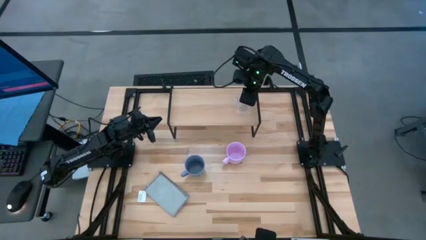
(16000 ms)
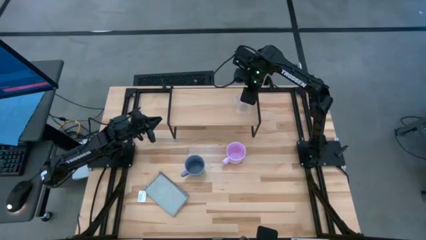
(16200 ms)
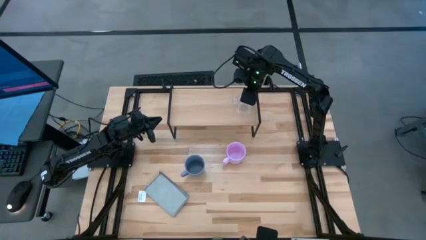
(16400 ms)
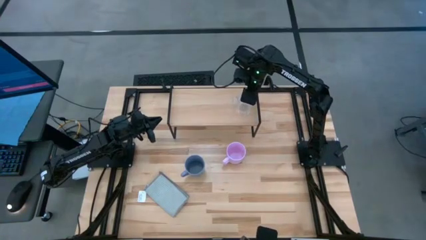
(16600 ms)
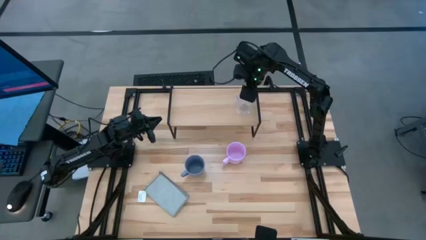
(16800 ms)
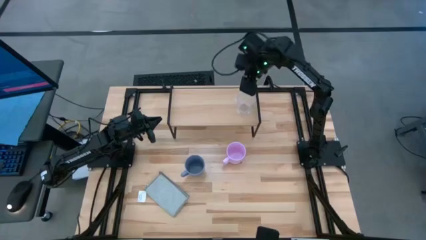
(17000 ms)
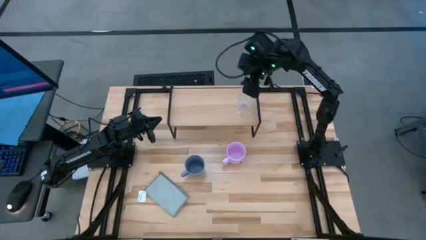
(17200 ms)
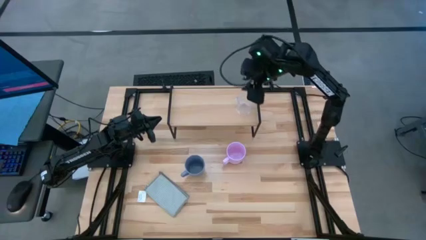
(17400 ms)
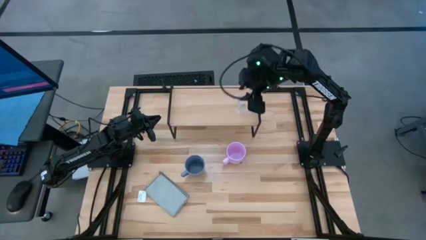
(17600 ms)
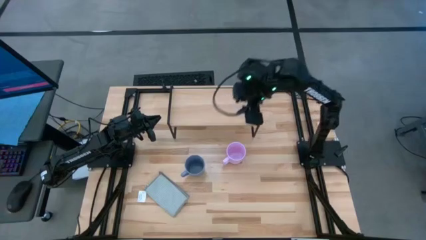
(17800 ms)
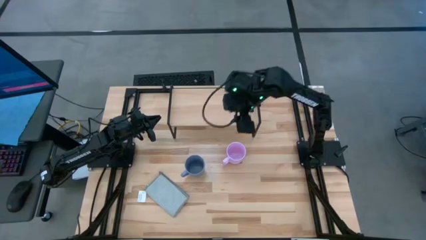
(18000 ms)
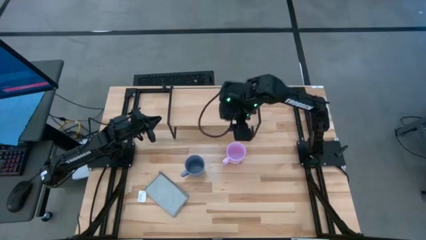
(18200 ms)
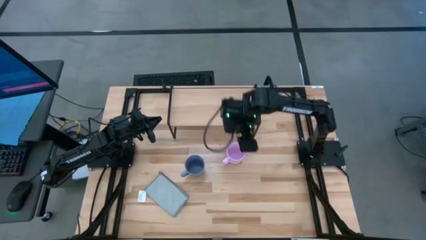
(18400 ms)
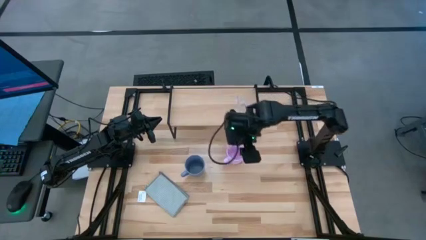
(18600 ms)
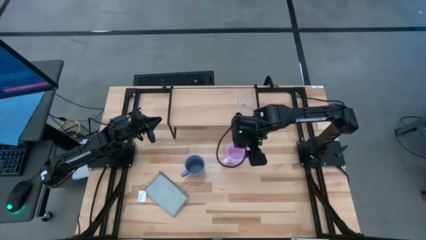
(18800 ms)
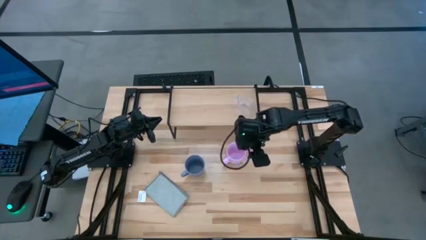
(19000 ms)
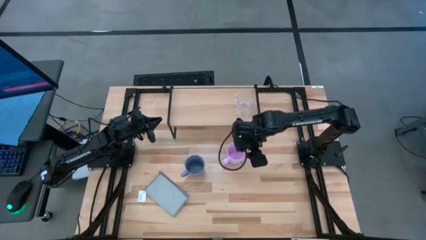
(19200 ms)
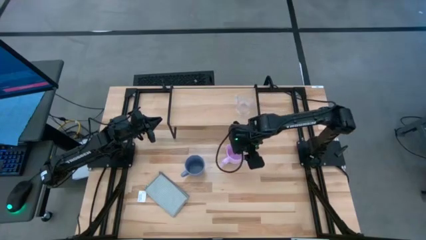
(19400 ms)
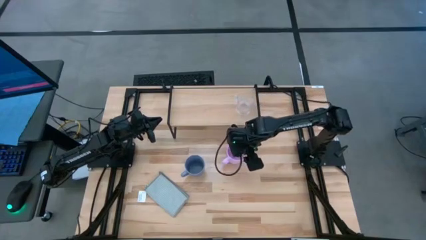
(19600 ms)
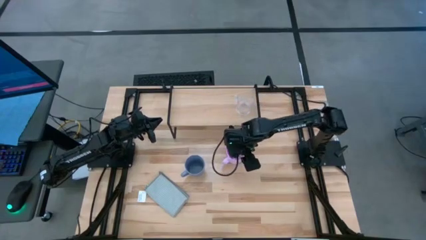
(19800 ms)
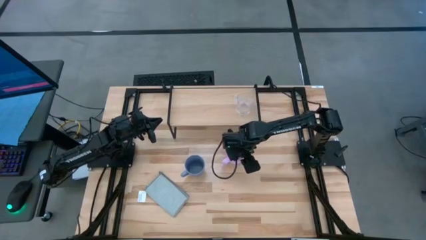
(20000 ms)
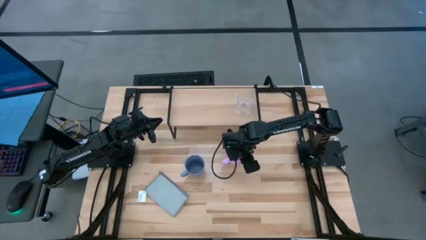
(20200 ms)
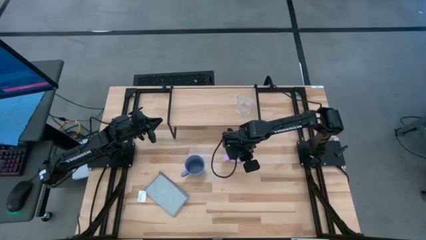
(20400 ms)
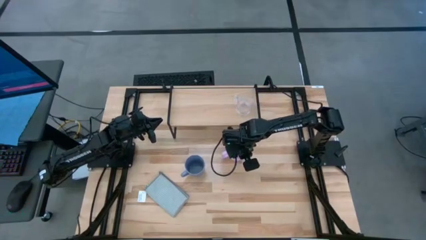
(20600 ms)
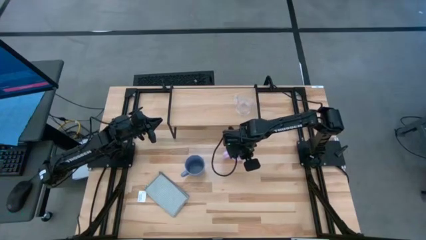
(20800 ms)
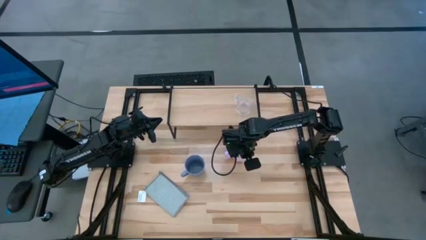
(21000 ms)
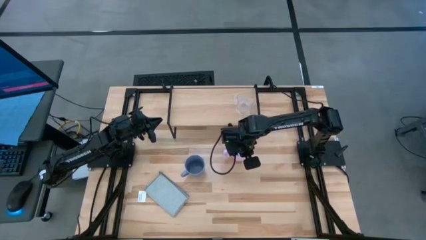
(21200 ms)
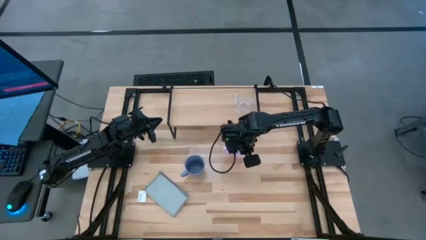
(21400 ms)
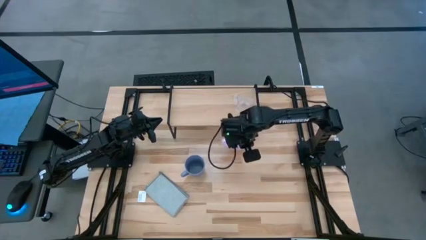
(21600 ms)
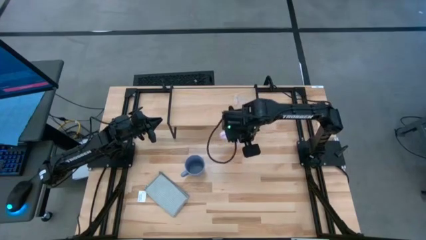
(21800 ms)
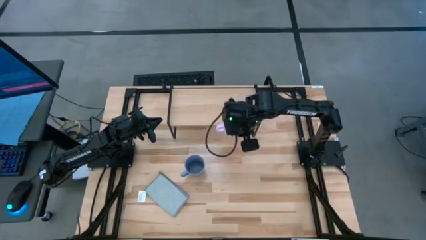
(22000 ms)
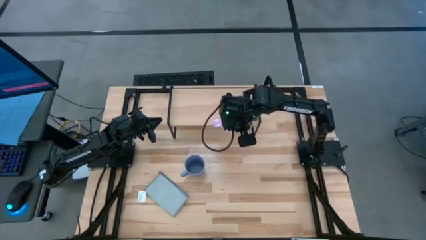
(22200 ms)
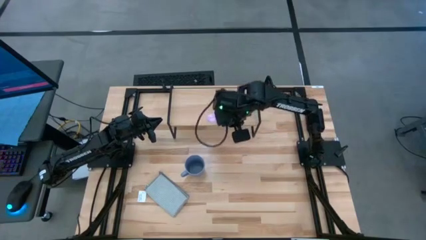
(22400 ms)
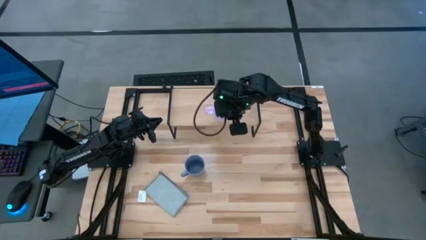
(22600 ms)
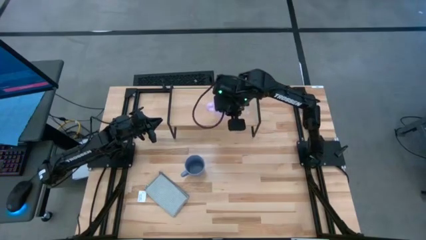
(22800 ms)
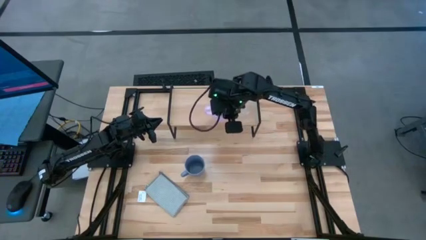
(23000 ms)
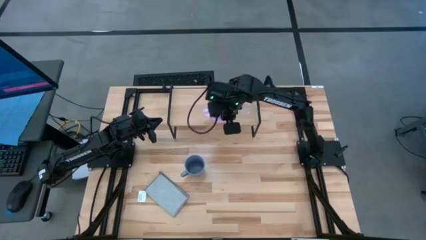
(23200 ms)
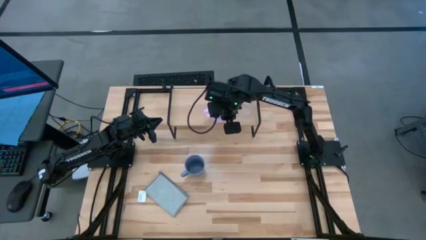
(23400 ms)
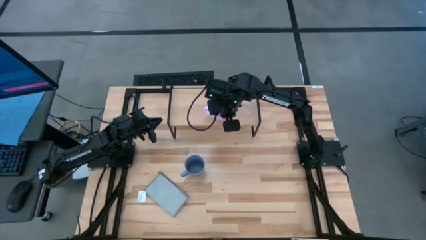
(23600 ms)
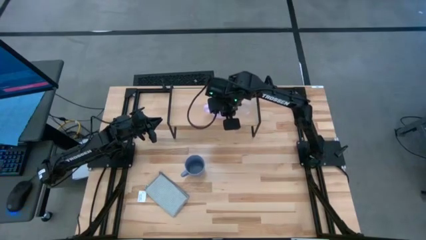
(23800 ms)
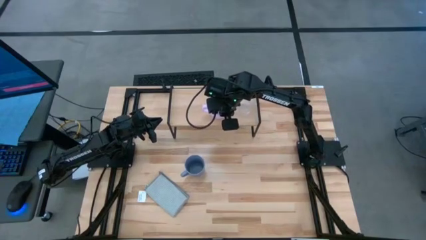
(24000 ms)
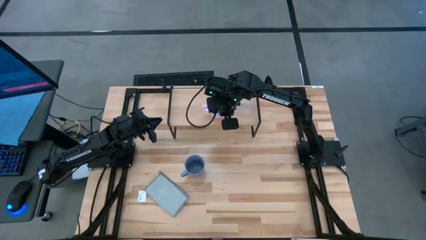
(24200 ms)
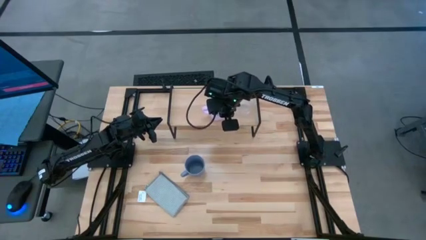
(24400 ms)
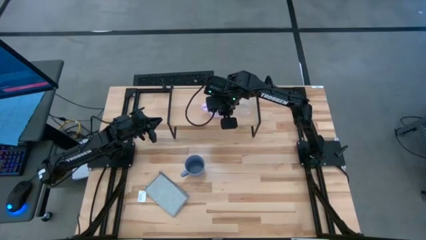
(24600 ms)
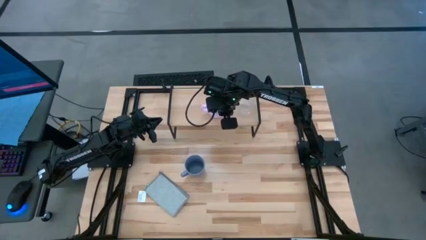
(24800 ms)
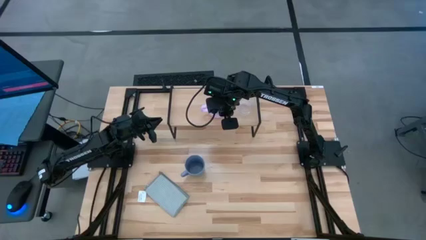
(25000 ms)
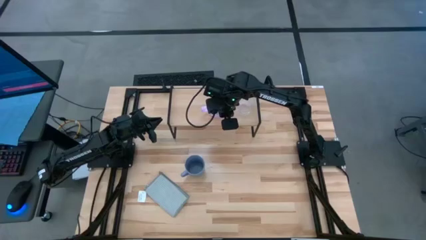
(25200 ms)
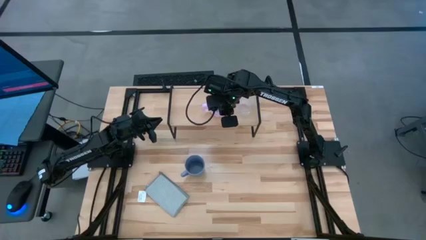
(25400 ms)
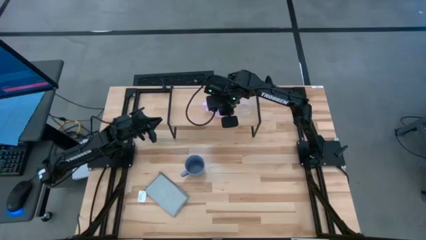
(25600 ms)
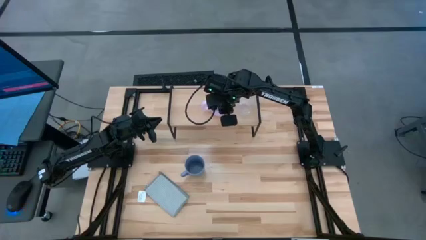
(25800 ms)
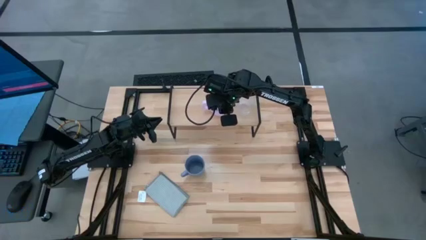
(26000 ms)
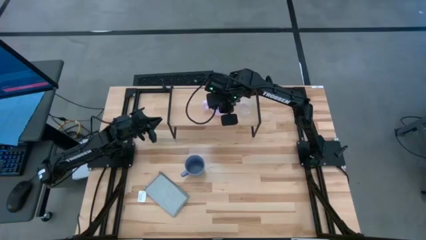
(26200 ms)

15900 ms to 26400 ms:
Task: Stack small to large cups/mugs on shelf
Put the pink mug on the shelf
